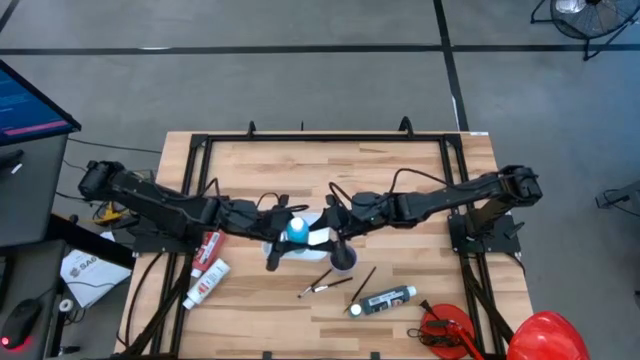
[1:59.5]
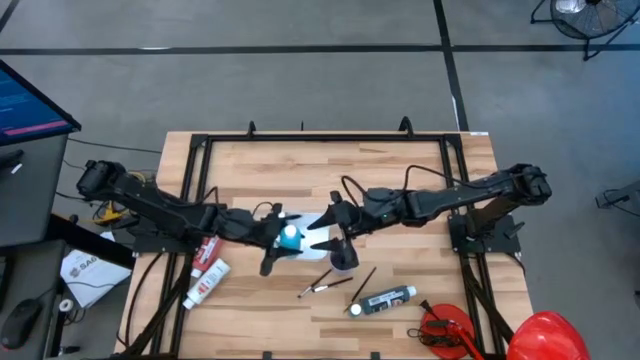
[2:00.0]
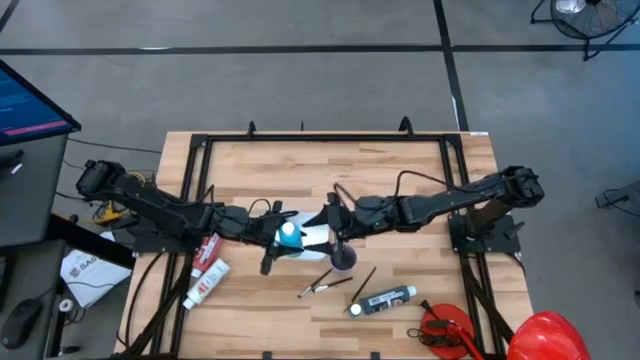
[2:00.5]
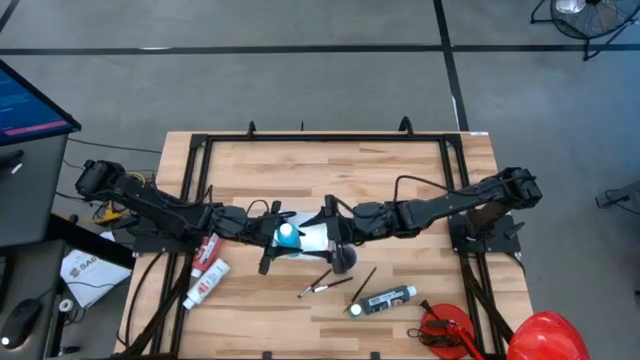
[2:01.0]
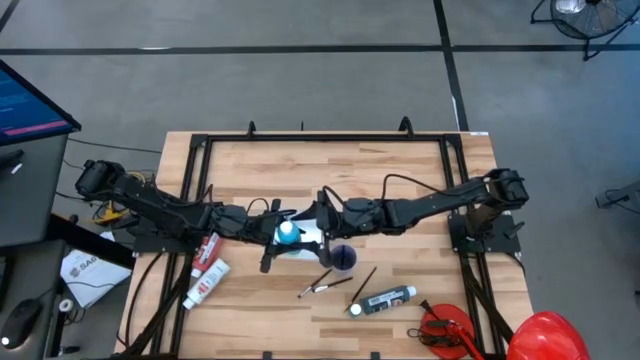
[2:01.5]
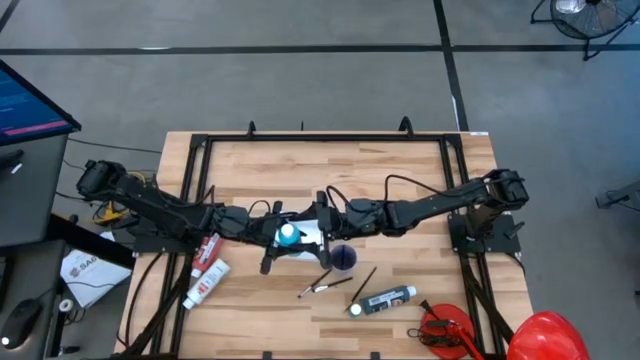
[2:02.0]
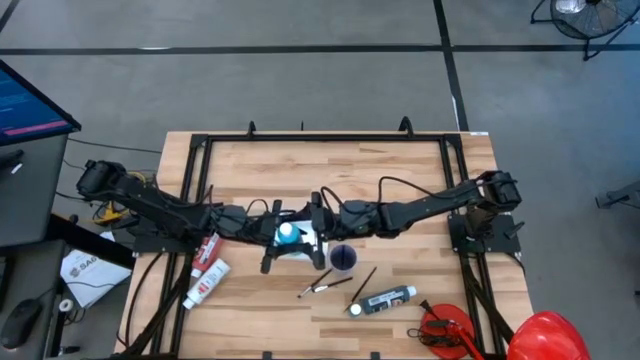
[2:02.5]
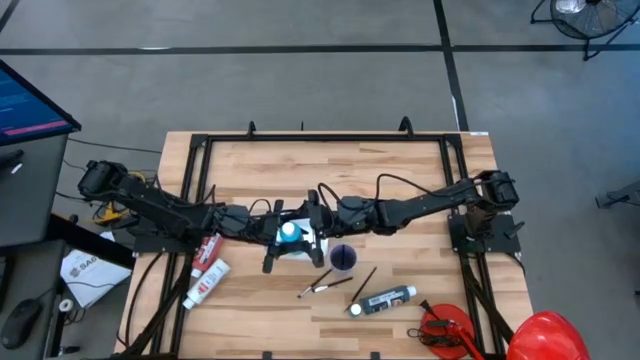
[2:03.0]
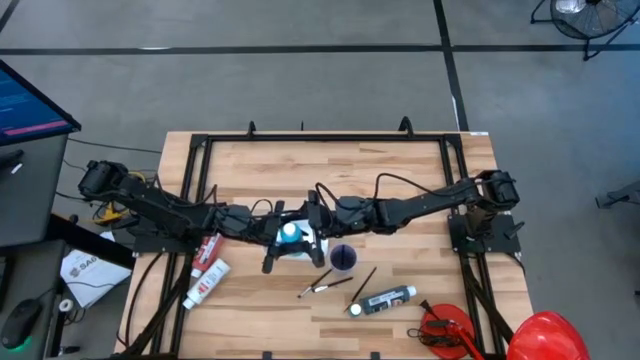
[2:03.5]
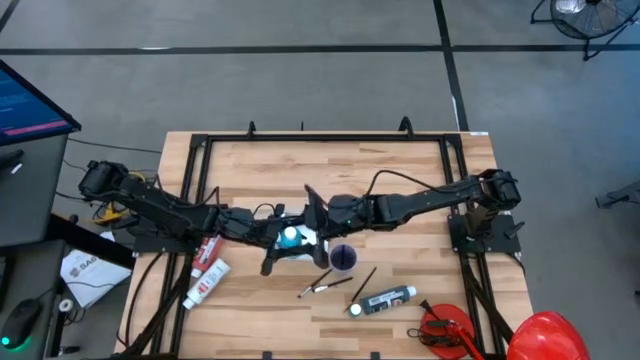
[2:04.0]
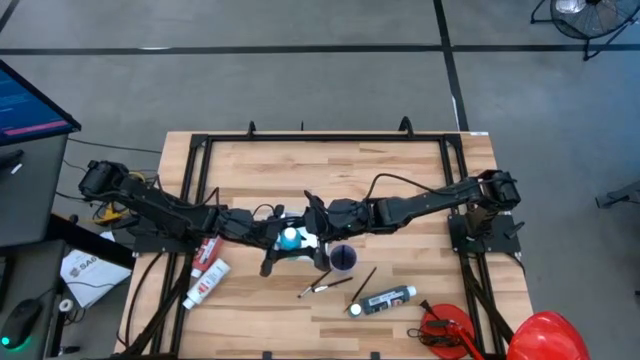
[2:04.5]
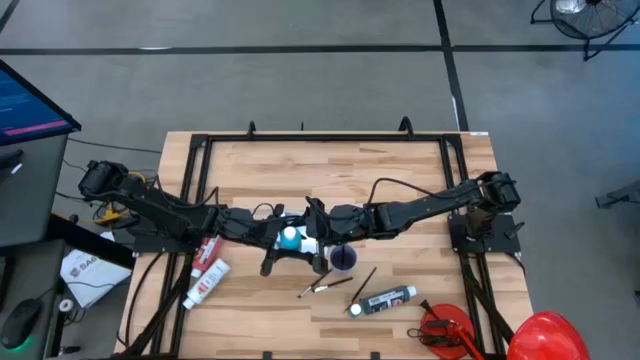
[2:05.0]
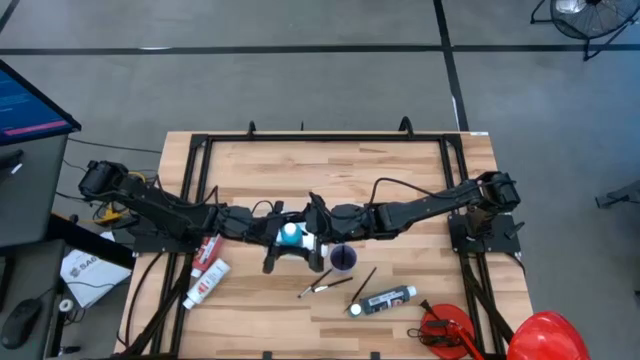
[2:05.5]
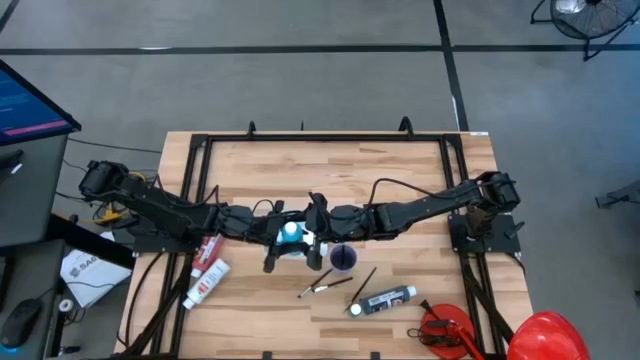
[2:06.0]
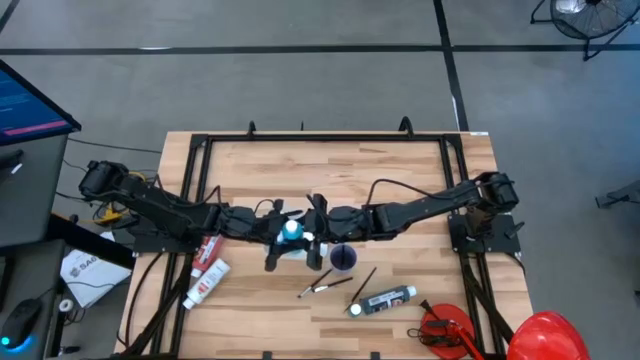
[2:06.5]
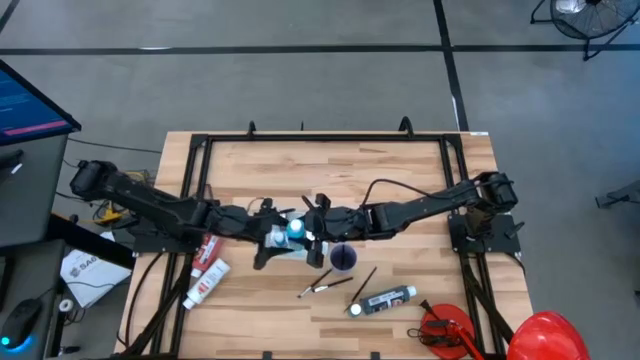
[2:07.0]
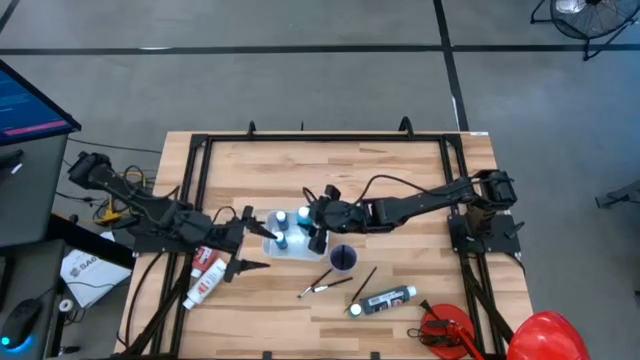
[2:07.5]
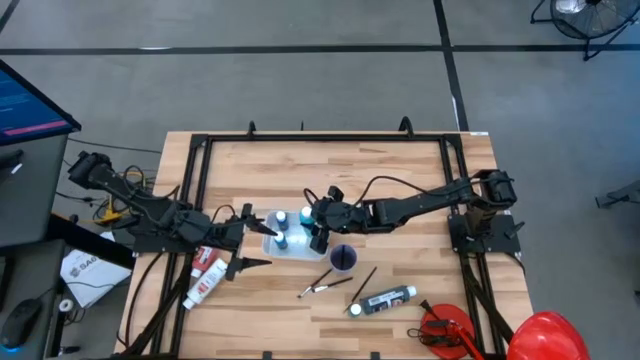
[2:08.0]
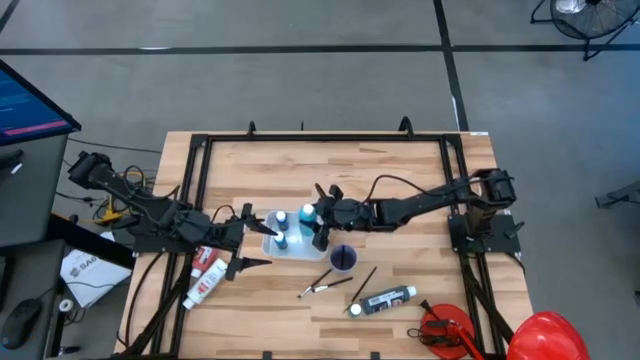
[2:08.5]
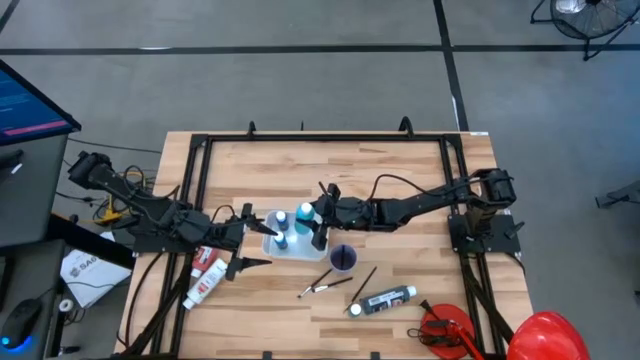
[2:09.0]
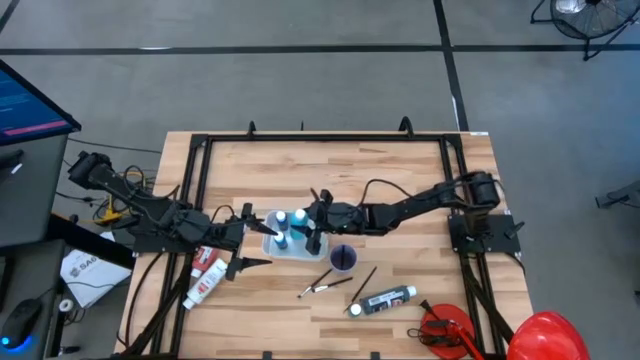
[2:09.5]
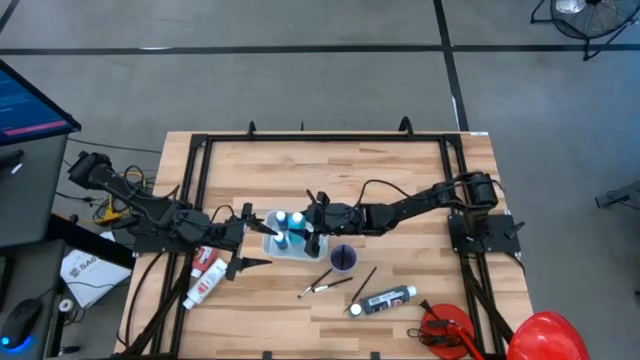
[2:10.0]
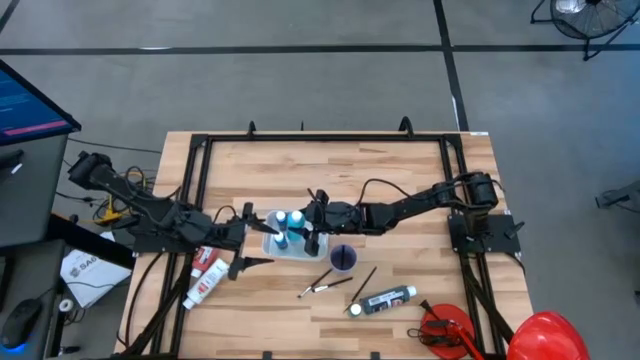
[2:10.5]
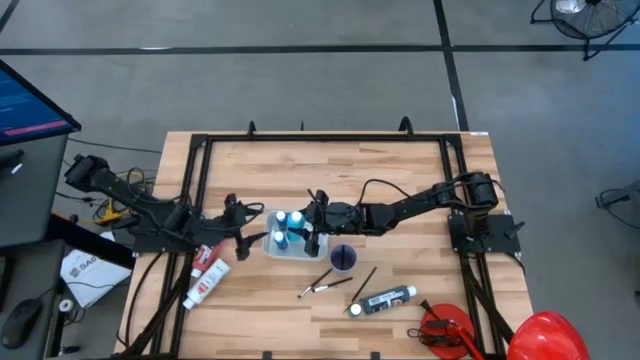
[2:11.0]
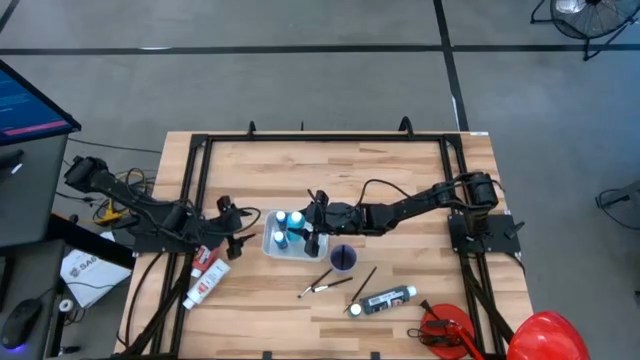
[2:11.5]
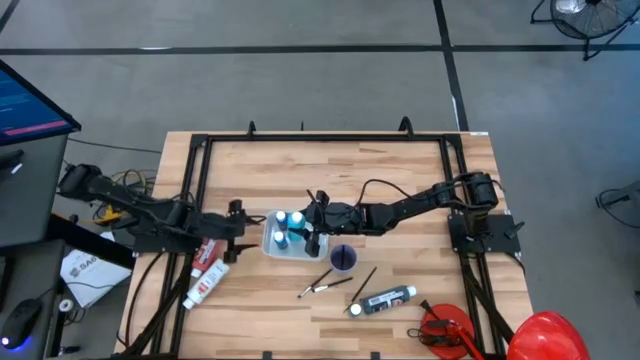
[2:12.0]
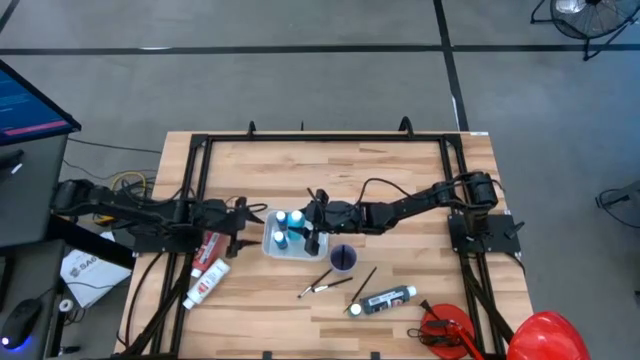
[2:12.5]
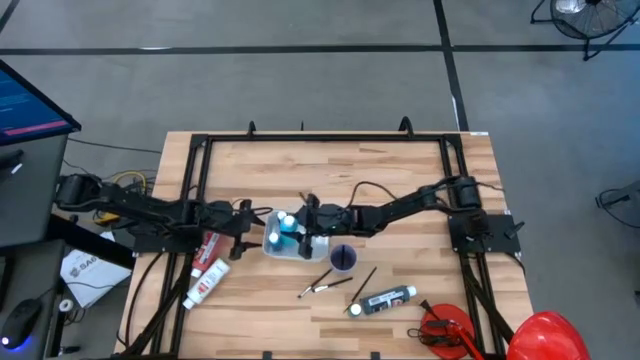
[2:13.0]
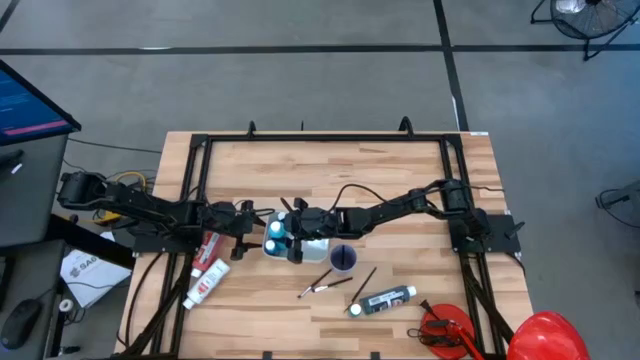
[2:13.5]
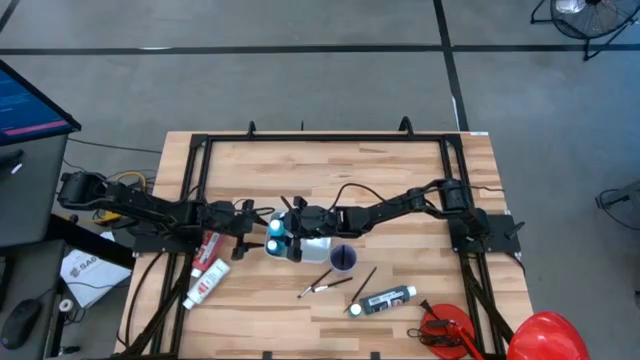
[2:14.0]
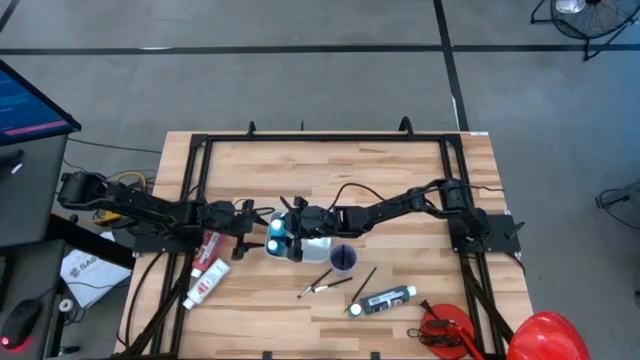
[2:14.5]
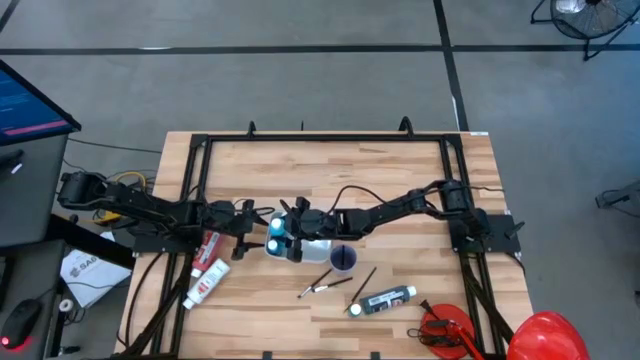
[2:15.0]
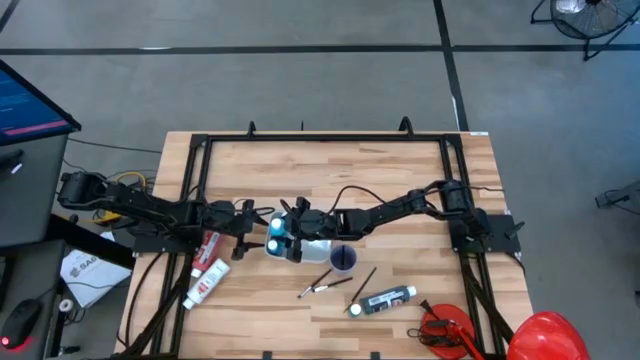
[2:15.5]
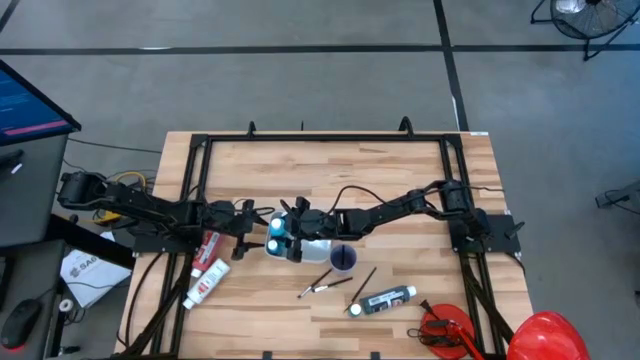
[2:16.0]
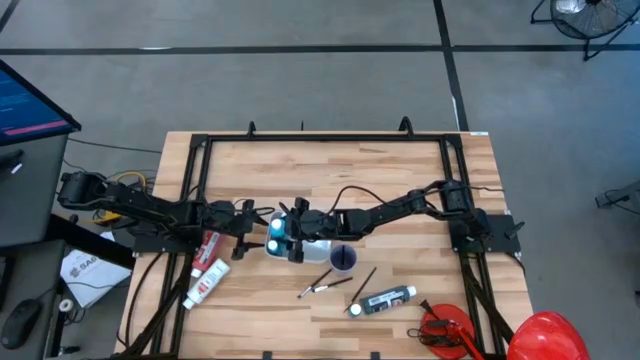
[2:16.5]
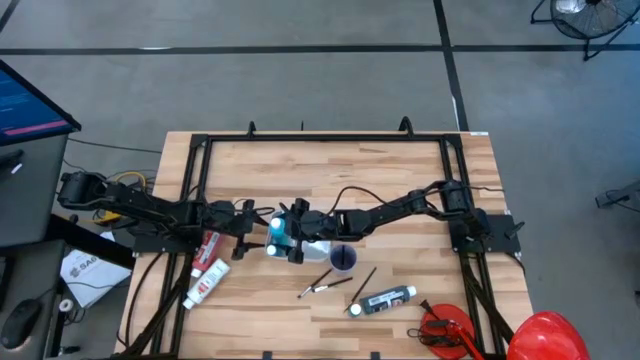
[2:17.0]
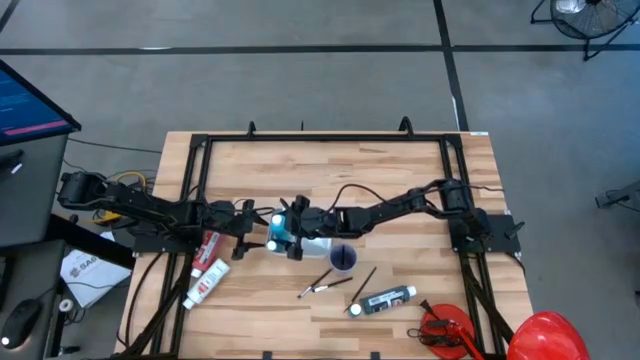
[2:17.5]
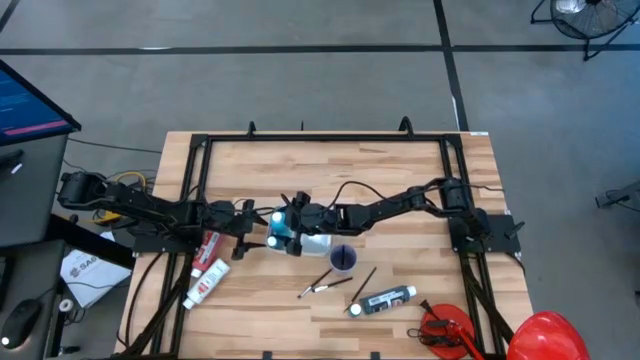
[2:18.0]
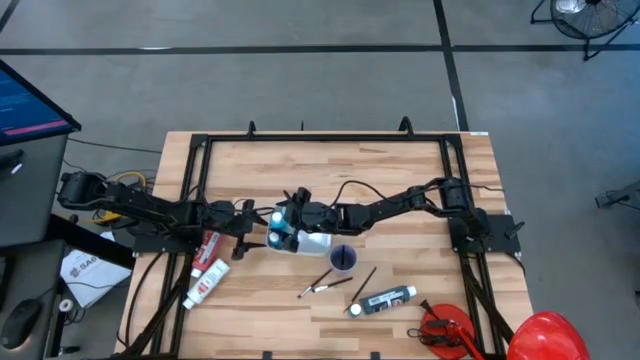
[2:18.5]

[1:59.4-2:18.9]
Task: Pick & Place Paint Supplies
Put the light blue paint bottle into the white bin
